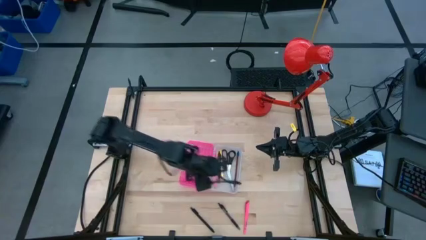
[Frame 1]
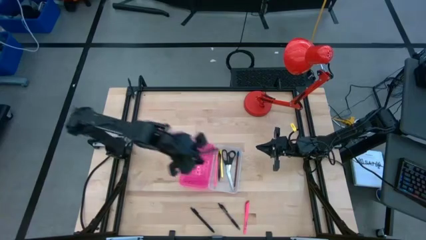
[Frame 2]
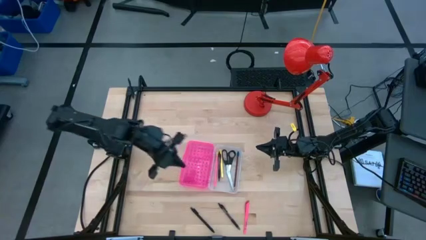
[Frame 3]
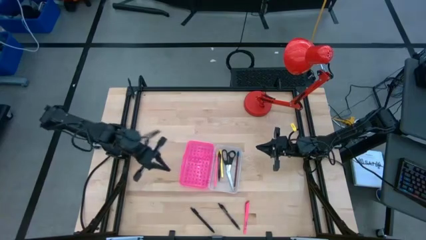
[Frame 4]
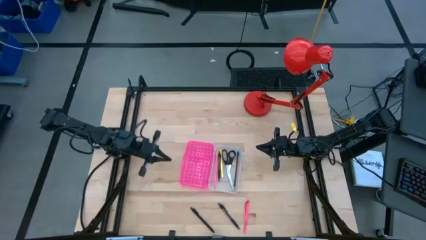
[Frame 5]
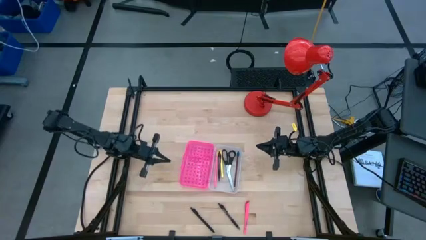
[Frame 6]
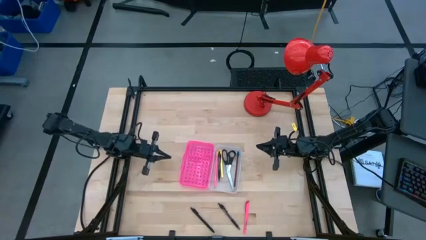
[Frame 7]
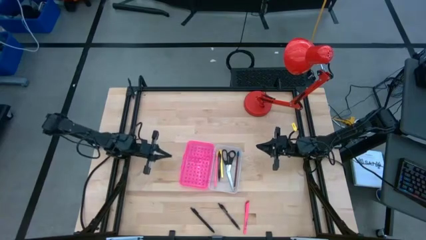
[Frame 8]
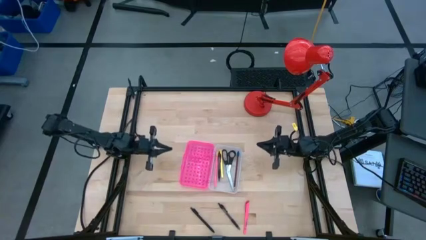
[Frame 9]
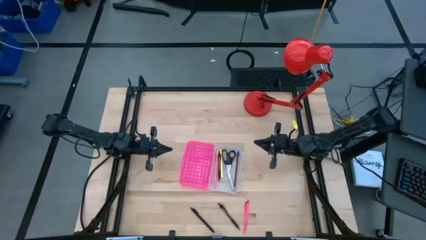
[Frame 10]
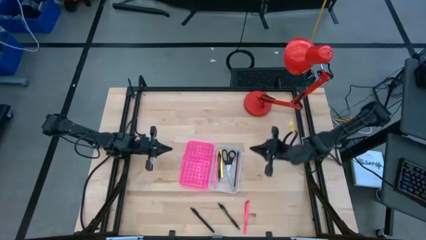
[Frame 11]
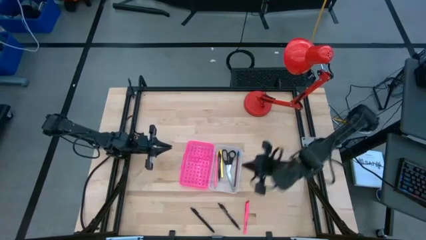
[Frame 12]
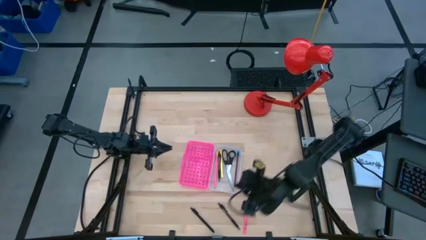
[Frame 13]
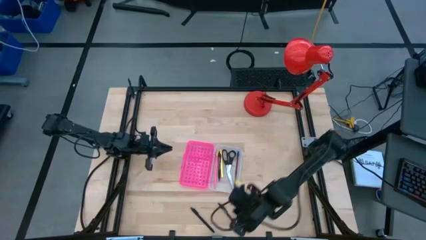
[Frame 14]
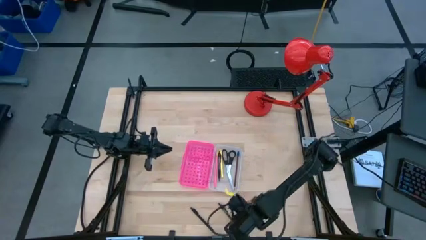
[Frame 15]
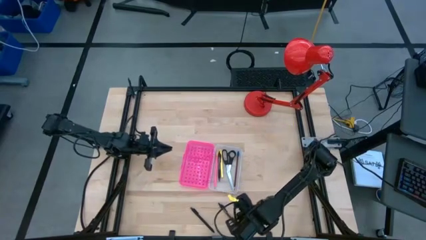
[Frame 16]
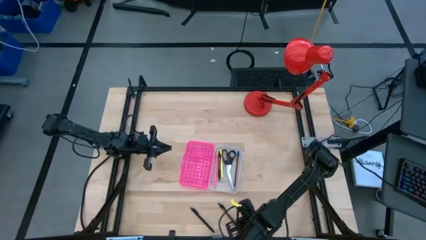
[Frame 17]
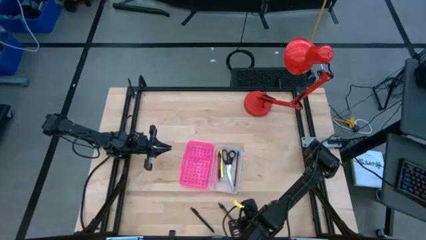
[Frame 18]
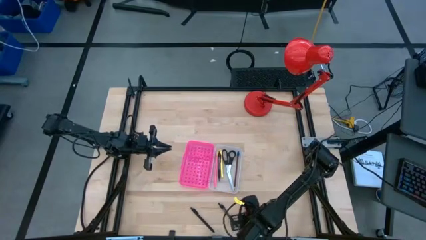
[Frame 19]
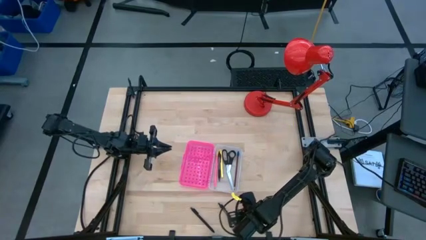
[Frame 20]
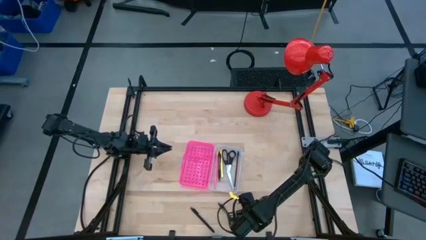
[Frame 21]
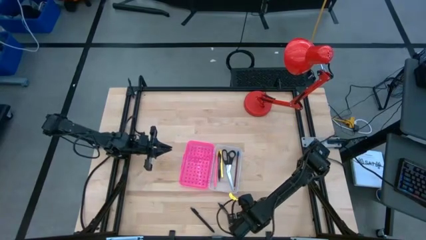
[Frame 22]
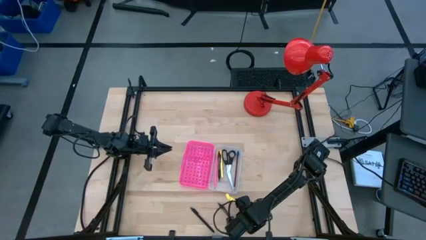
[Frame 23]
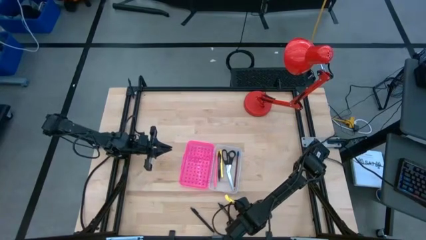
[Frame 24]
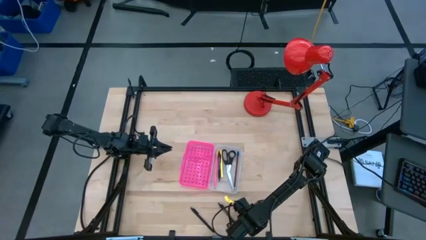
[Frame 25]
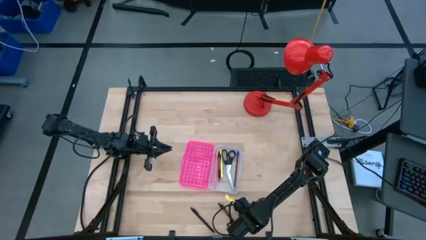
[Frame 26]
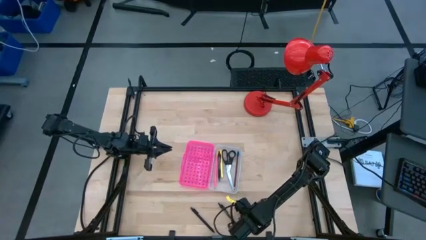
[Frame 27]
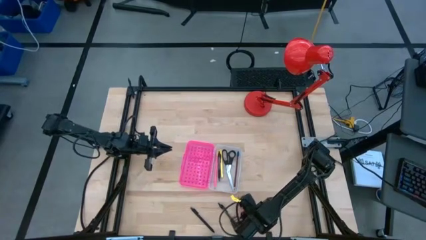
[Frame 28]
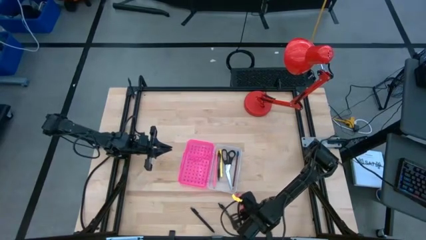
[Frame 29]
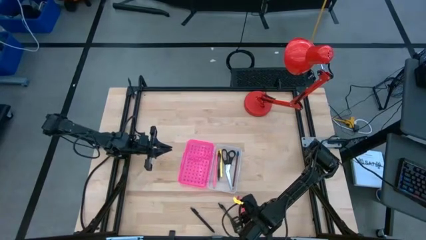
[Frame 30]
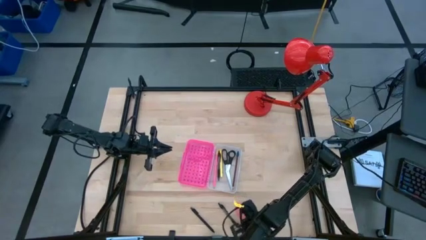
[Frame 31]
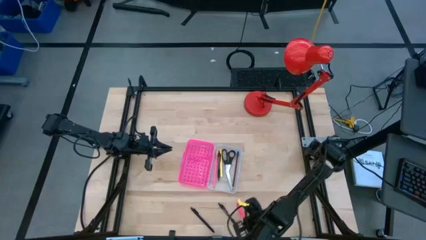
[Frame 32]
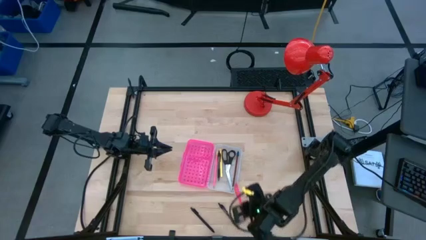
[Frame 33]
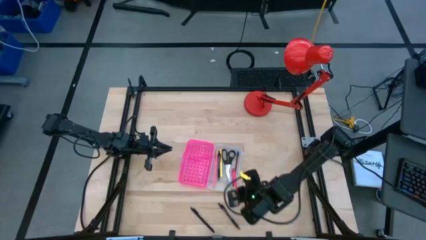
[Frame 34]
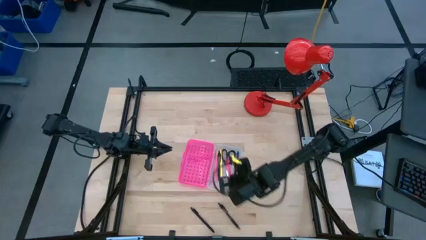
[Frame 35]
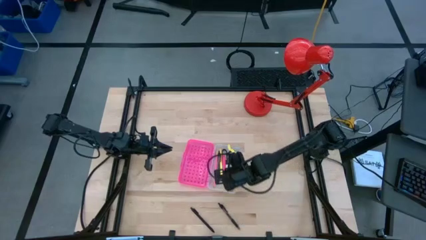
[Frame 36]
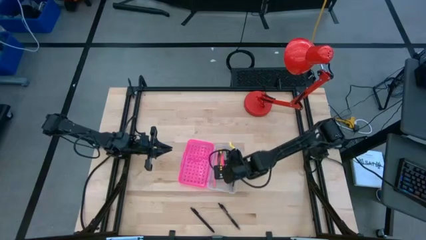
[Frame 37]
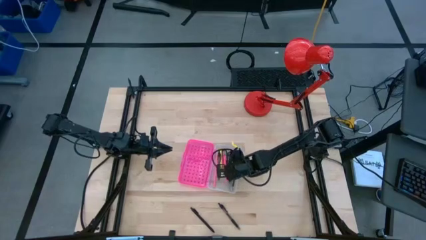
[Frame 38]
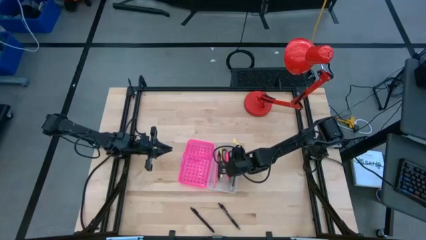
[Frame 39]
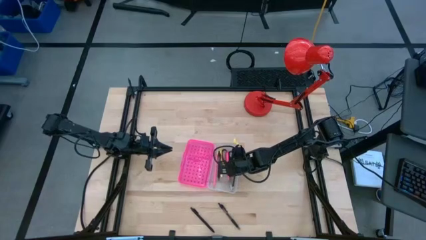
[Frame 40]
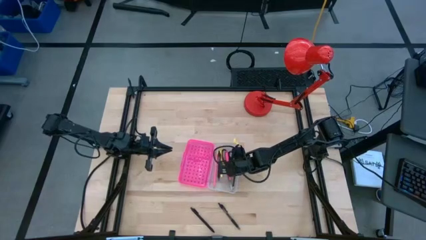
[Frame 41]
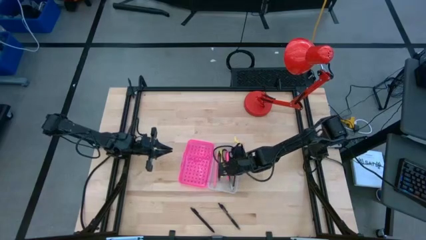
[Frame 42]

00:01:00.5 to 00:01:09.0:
Task: Pick & place school supplies into a supply box
Put the pink pen into the pink box

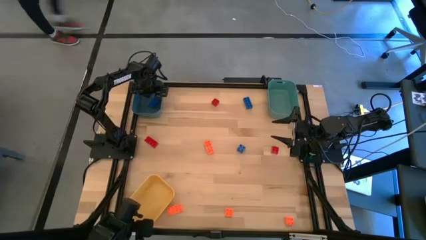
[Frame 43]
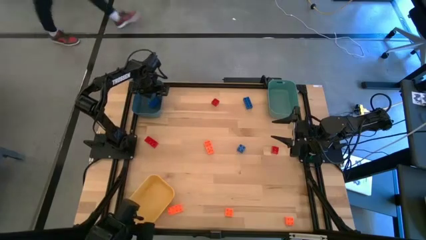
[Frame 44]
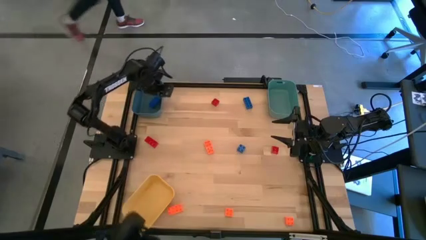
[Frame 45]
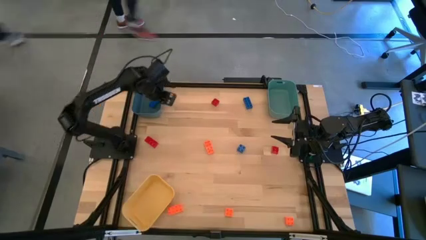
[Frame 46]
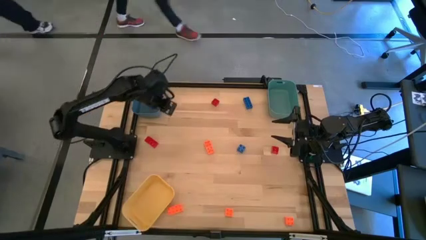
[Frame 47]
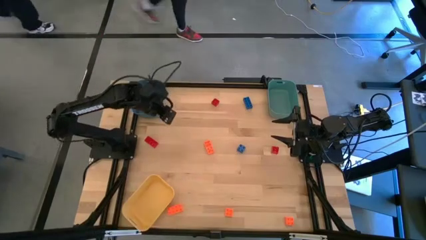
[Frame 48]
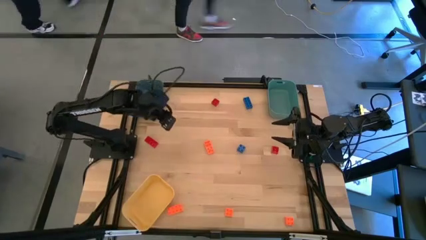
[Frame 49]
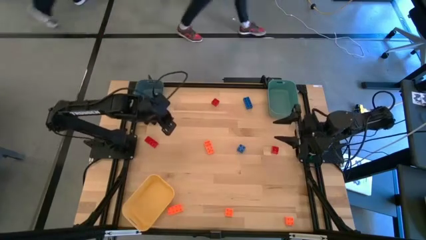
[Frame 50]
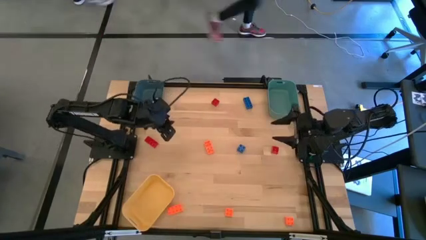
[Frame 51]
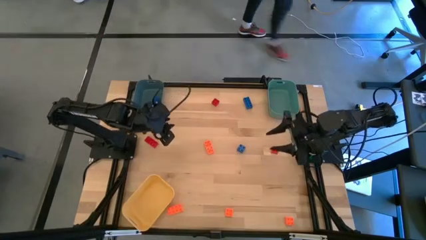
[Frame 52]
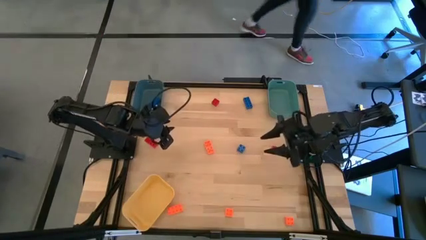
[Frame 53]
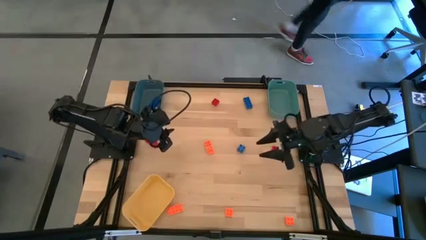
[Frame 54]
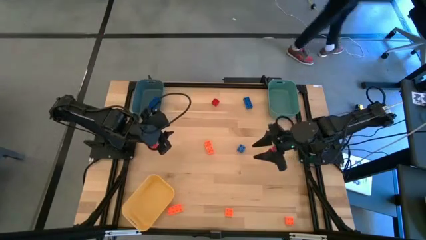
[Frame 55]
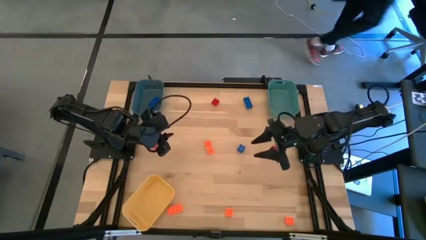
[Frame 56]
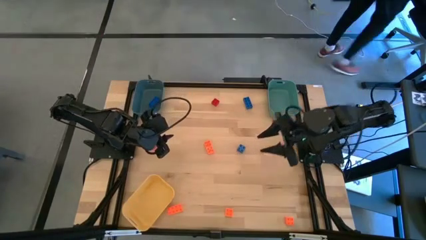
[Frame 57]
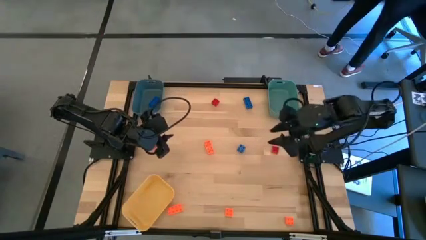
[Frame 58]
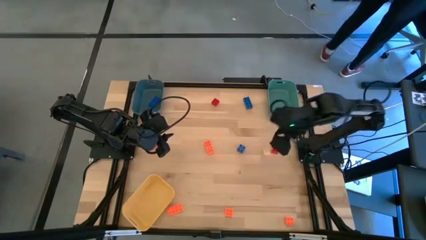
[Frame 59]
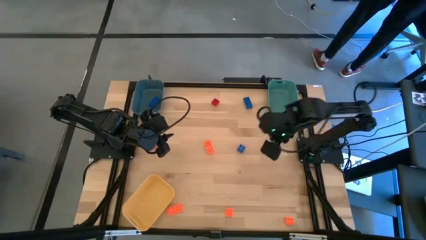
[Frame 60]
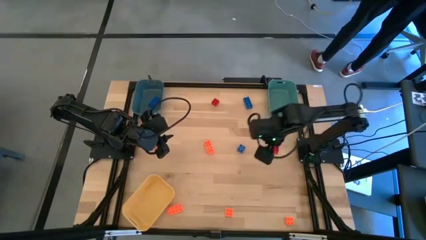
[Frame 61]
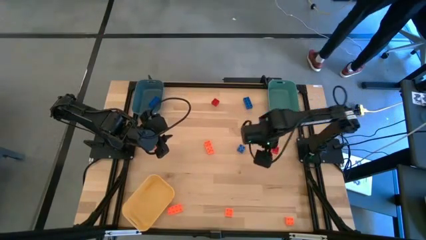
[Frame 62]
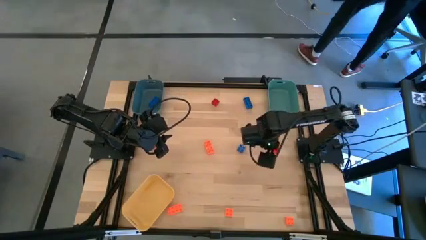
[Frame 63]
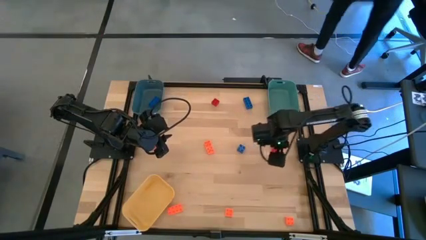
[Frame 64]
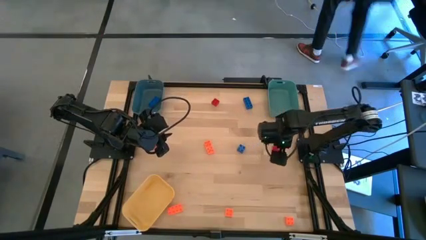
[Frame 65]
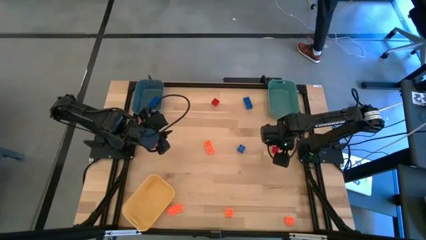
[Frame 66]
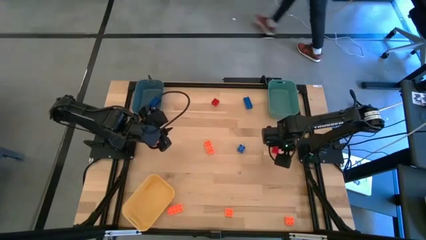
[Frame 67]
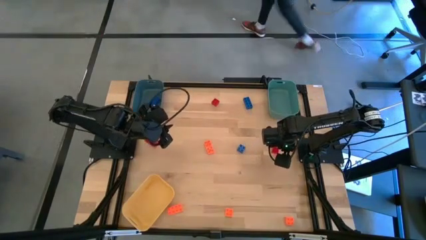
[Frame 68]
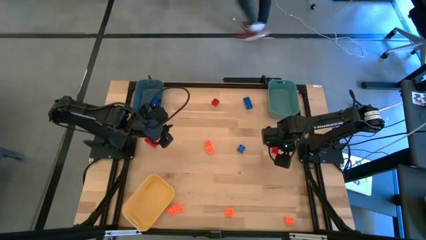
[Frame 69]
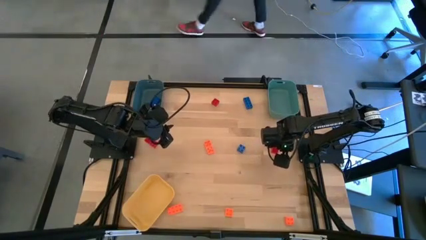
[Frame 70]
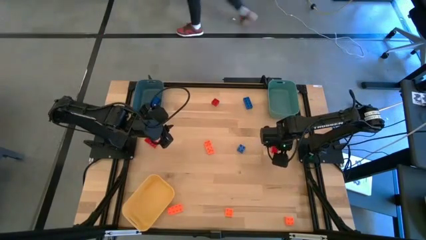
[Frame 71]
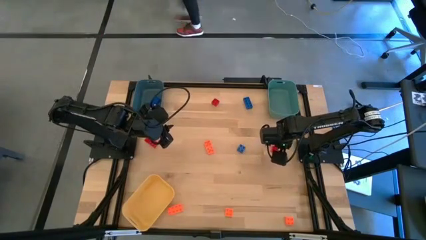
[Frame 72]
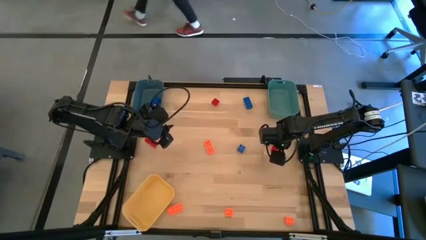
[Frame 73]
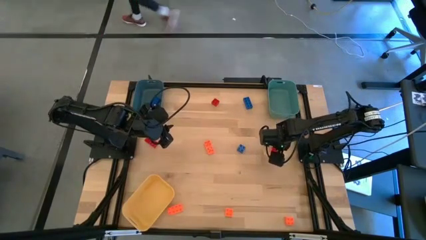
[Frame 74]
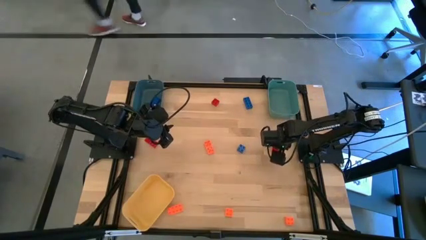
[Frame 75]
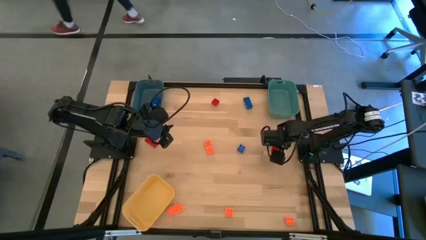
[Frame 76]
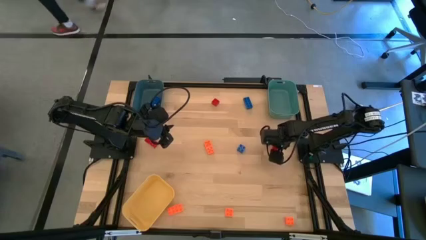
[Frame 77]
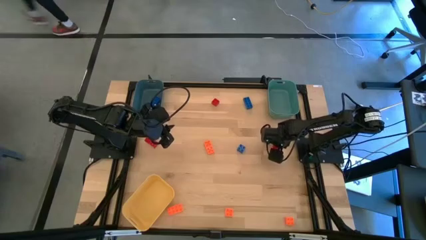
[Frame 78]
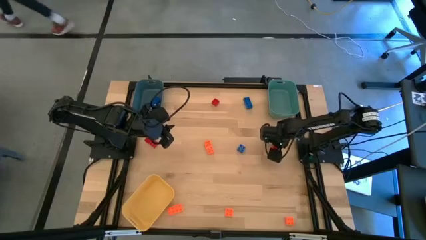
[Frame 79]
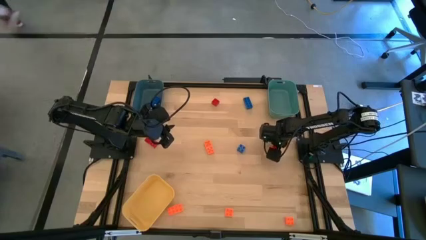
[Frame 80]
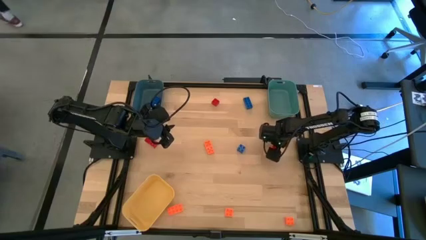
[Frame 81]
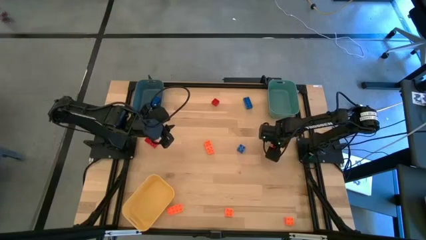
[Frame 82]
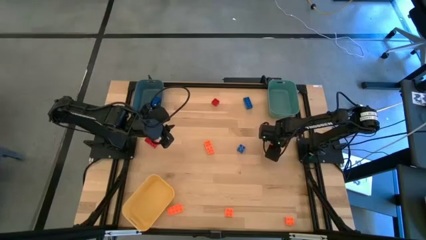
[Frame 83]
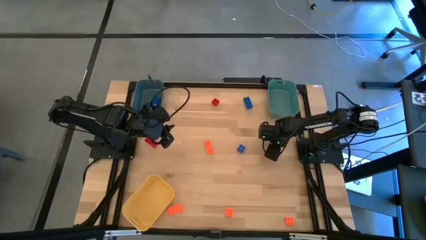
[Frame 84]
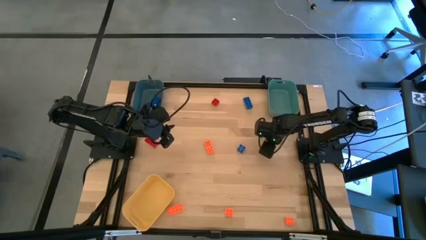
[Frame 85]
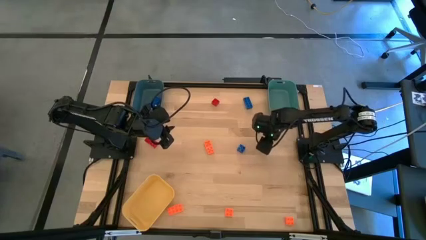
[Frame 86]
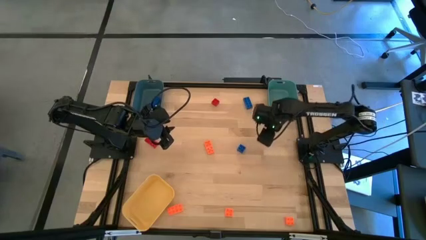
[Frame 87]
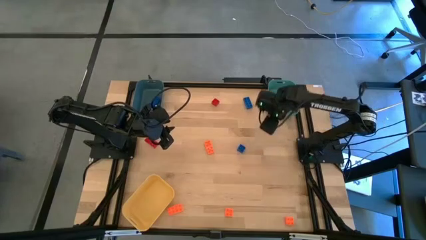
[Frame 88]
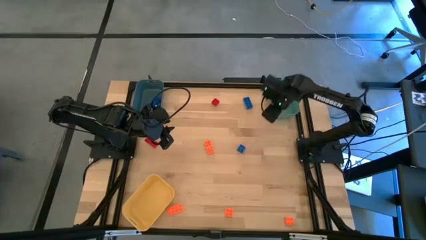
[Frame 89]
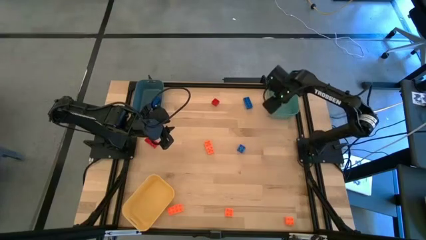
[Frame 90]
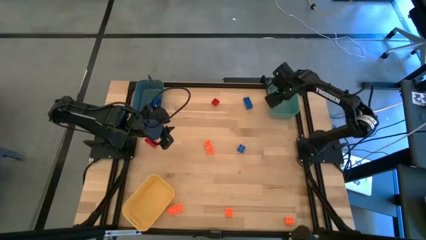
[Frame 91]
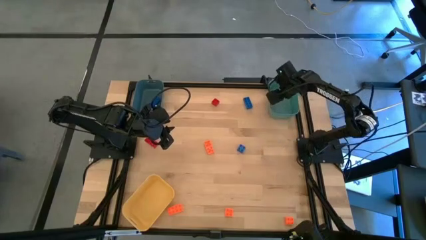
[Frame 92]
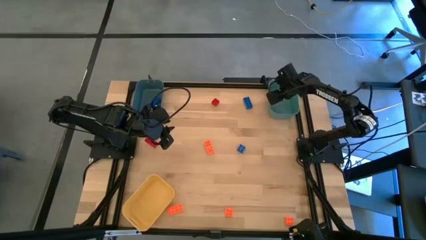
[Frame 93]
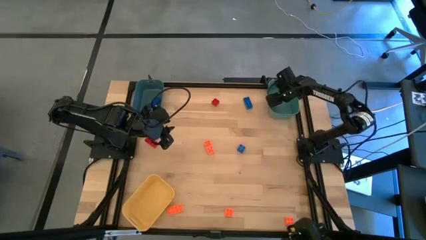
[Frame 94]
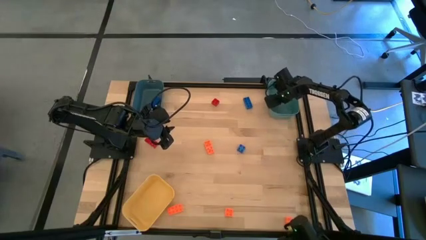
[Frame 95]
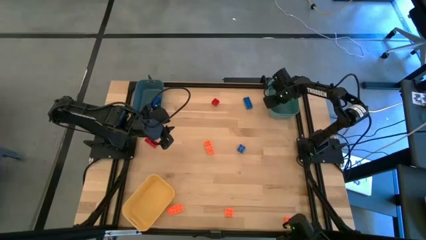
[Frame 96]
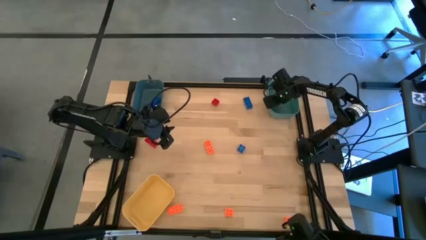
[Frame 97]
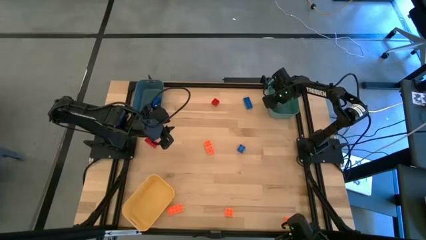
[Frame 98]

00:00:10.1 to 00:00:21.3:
Task: Sort & place blocks by color
Put the right red game piece into the green bin
